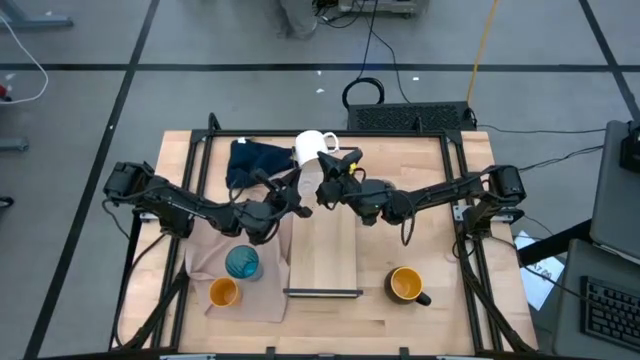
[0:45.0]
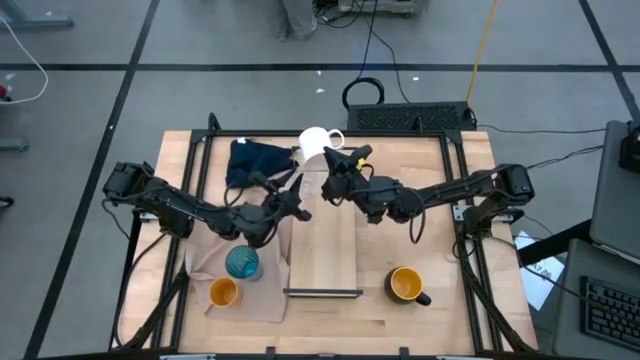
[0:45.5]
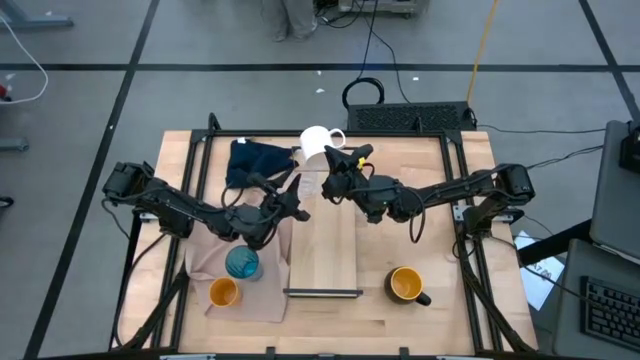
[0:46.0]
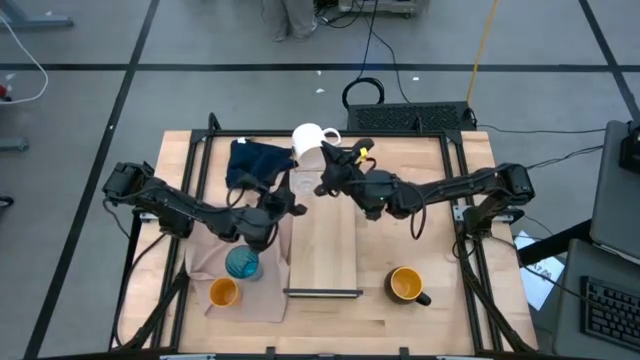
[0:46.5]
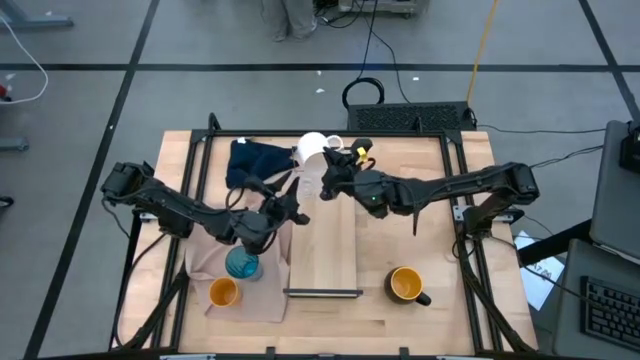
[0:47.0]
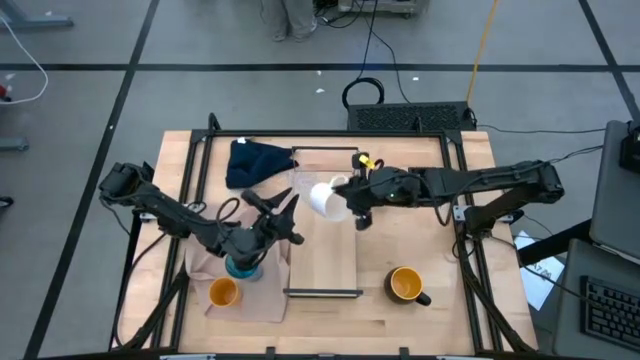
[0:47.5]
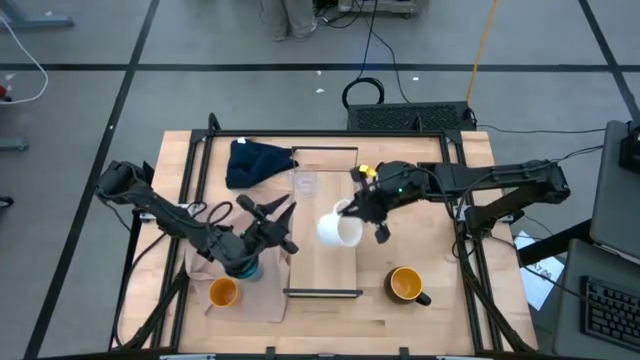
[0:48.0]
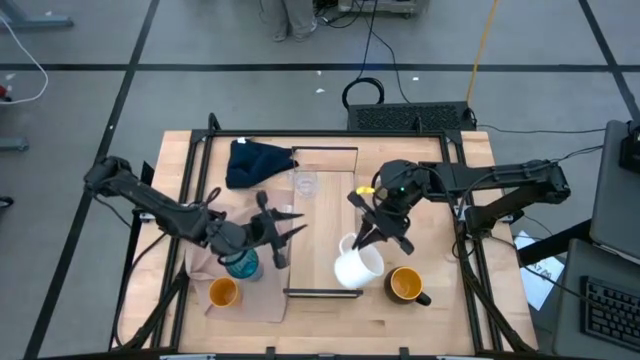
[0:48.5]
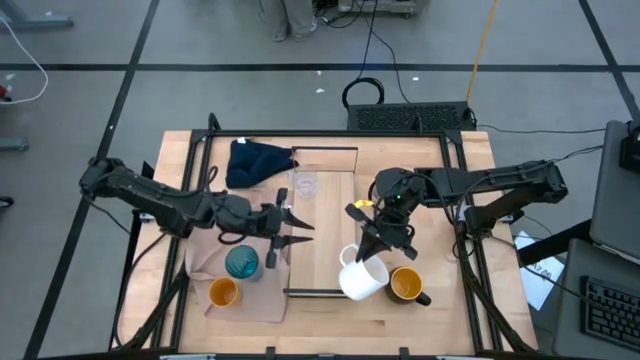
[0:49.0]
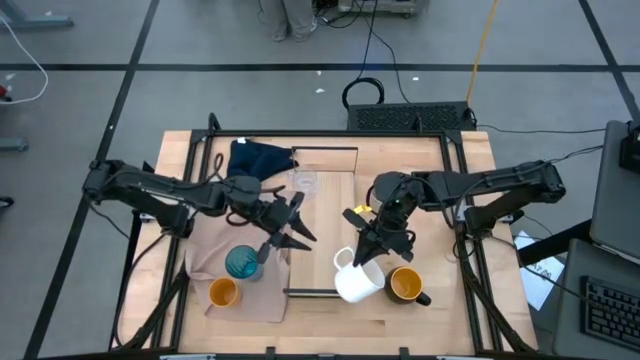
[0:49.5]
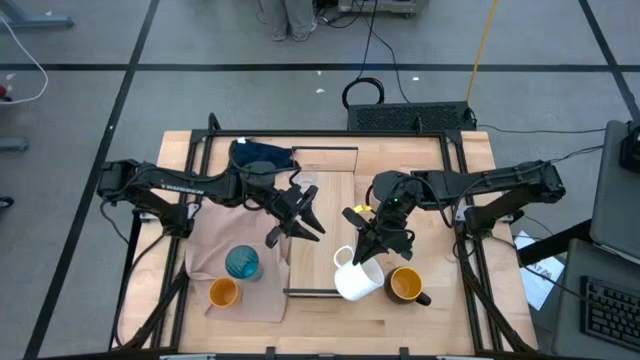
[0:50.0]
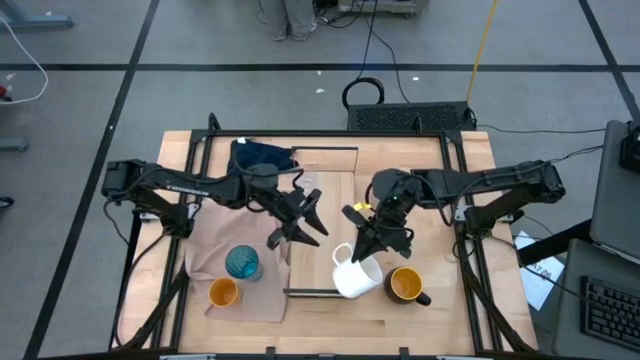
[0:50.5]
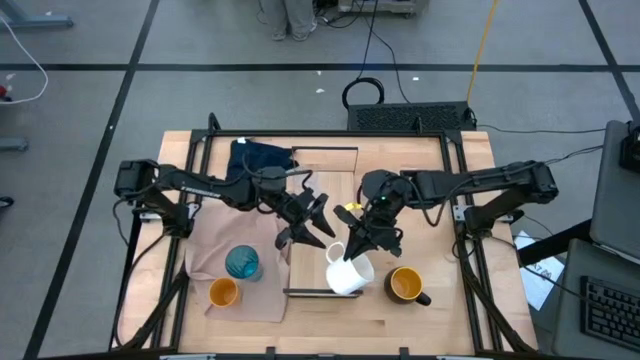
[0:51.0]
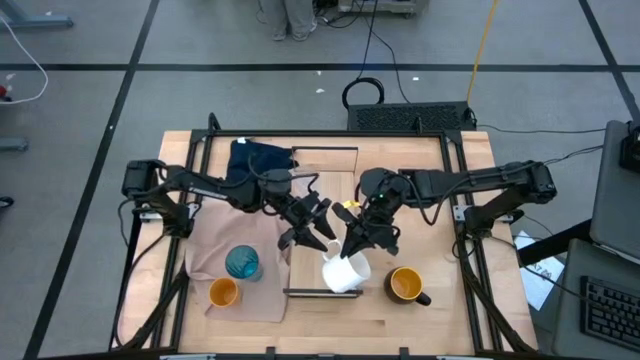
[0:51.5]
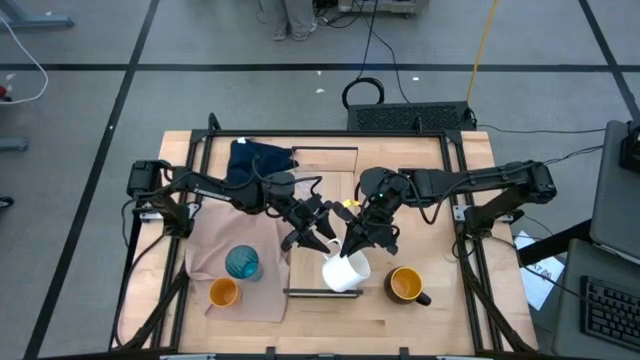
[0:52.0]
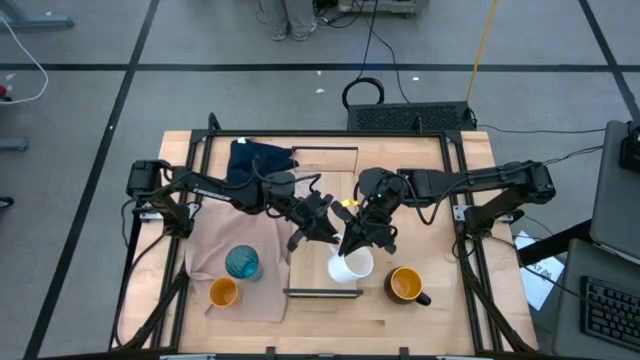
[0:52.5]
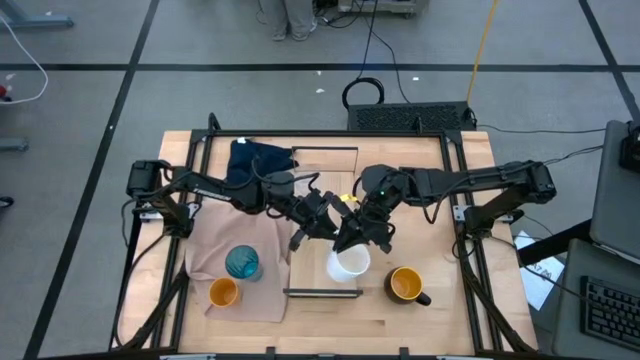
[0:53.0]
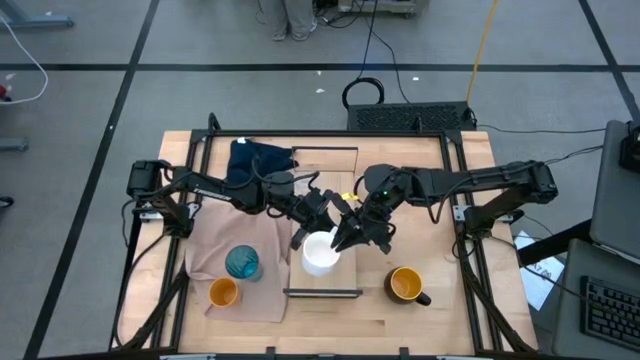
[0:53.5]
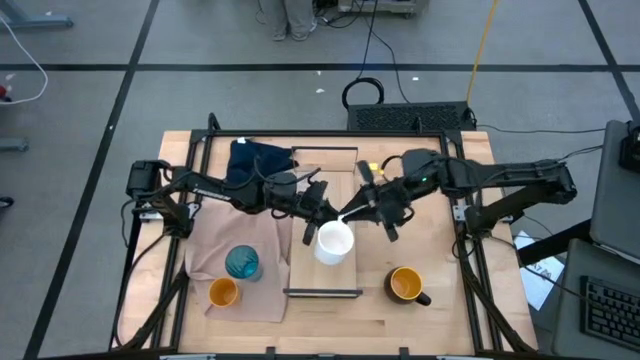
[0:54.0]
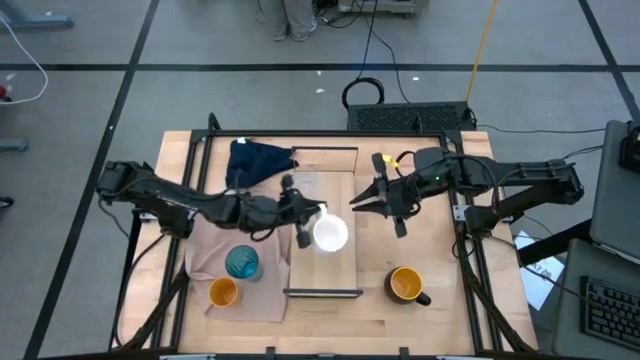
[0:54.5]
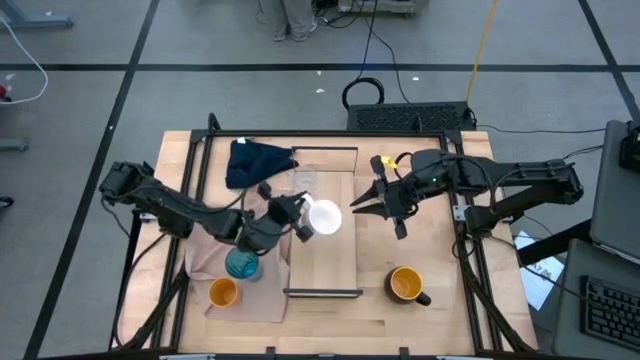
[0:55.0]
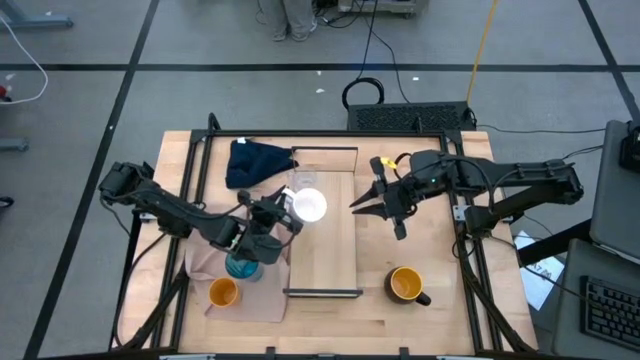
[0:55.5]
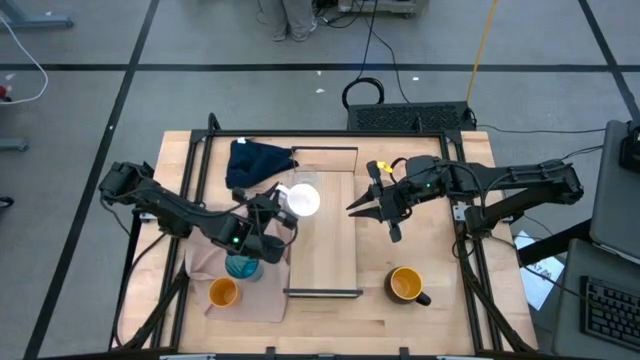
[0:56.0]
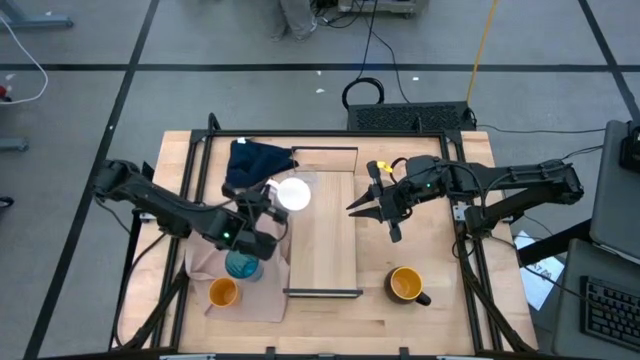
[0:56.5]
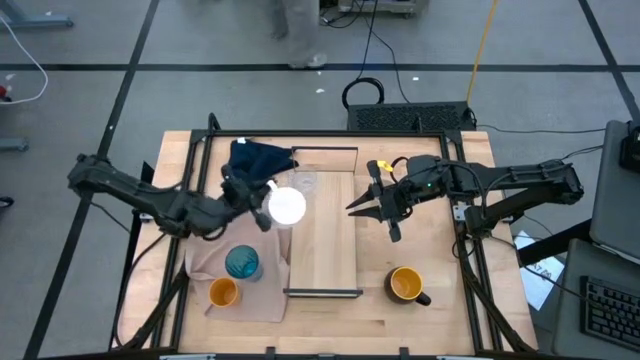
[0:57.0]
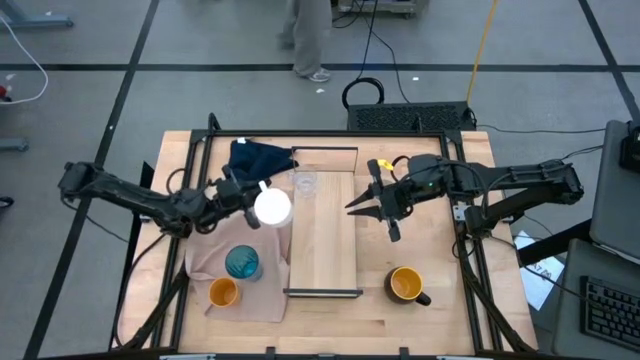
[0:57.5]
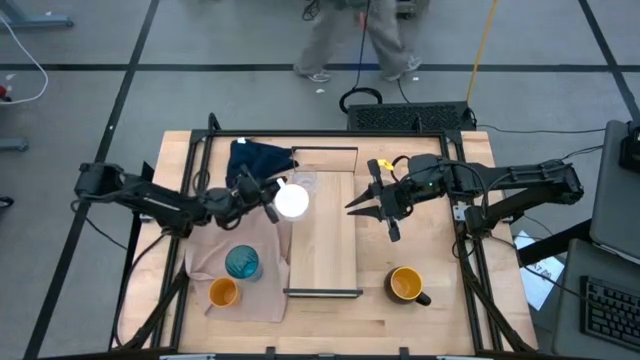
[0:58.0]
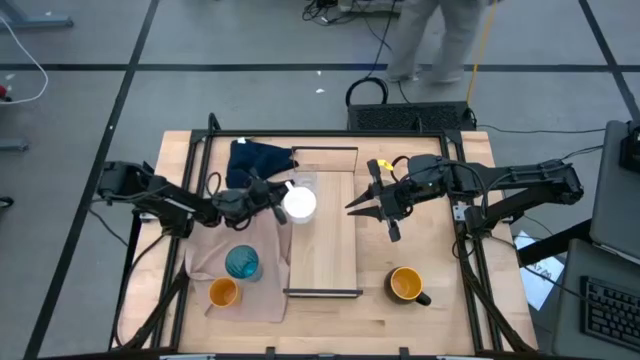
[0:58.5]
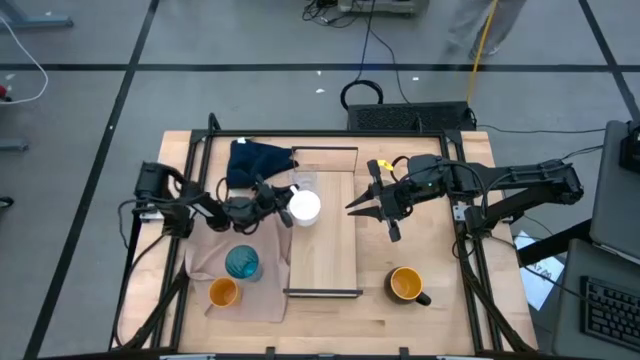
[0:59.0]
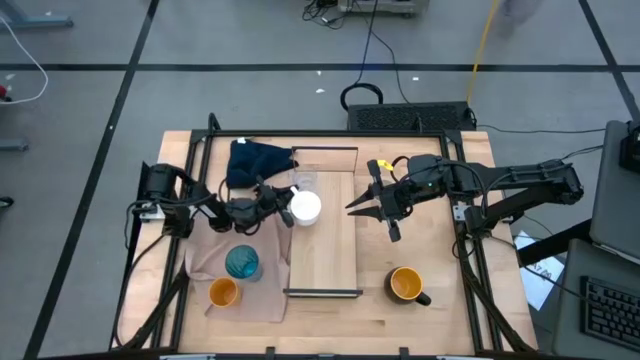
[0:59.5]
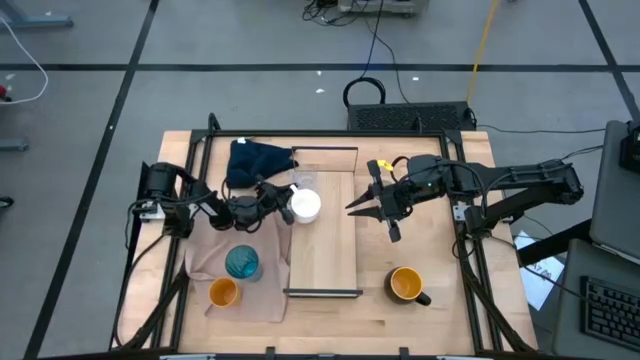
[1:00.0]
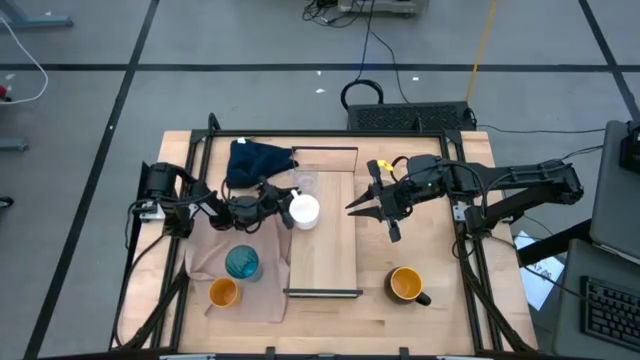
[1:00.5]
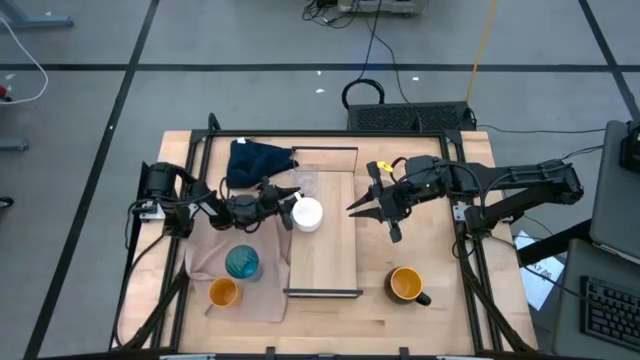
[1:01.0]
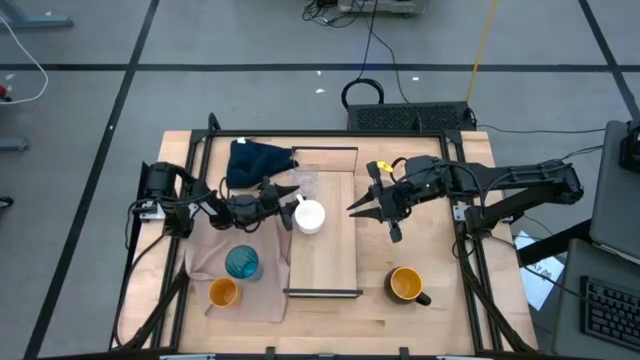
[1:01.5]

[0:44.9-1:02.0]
Task: Stack small to large cups/mugs on shelf
Put the white mug on the shelf

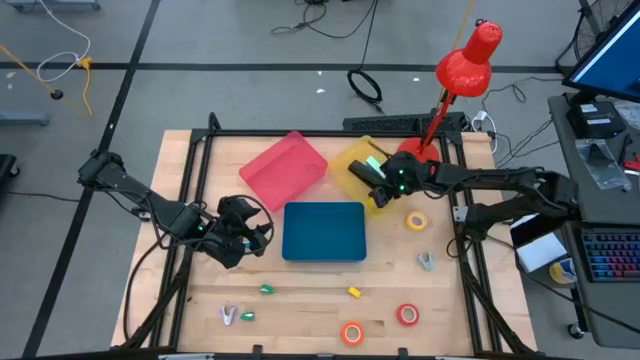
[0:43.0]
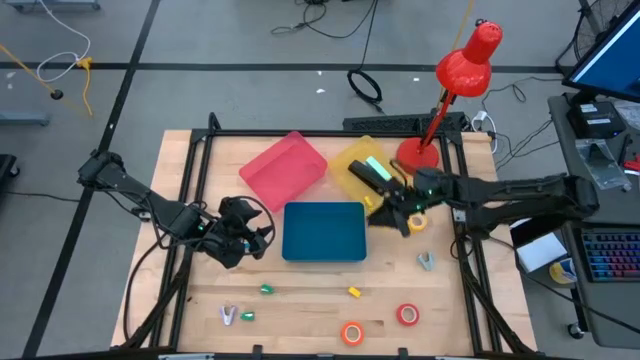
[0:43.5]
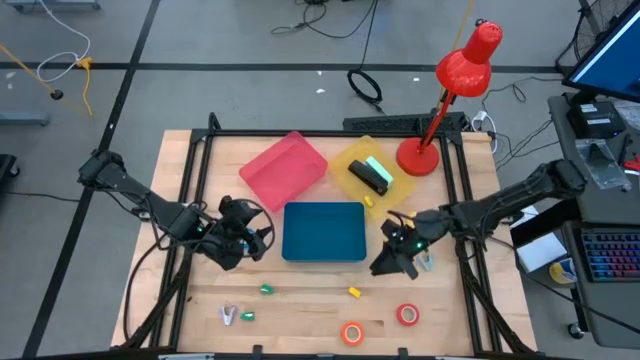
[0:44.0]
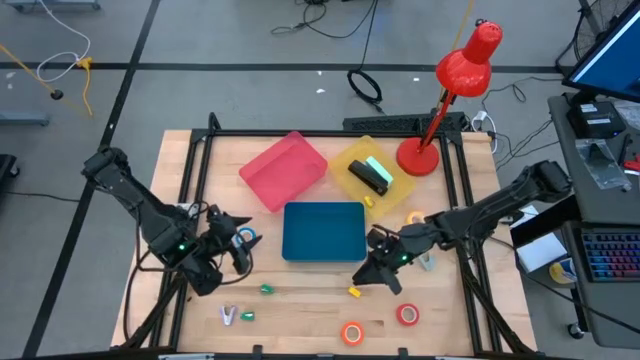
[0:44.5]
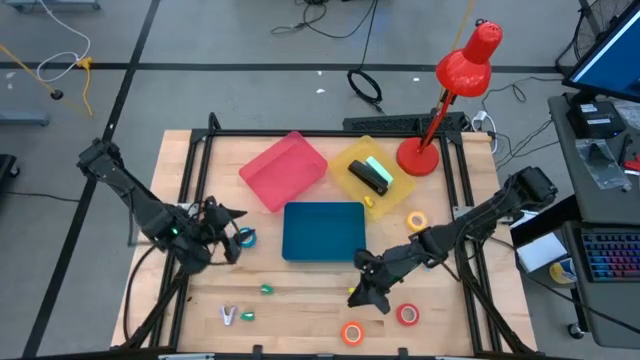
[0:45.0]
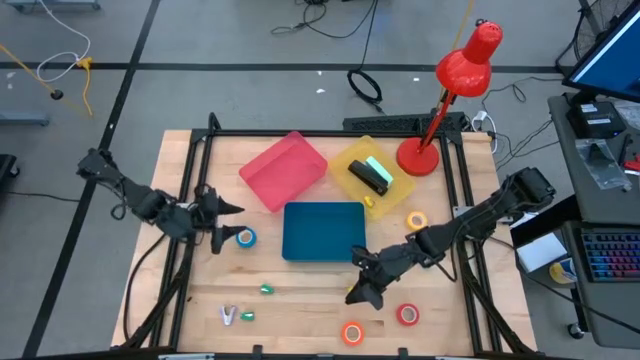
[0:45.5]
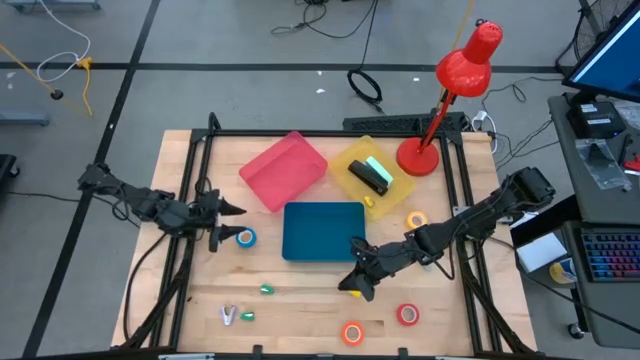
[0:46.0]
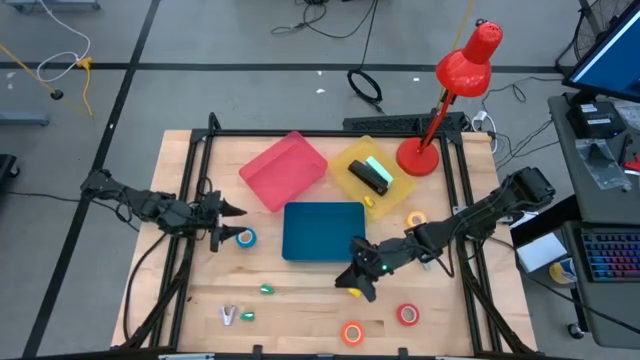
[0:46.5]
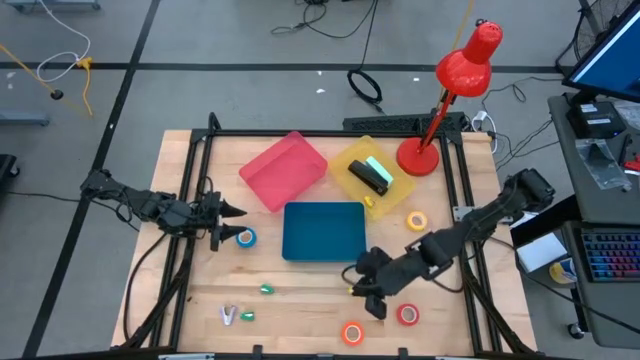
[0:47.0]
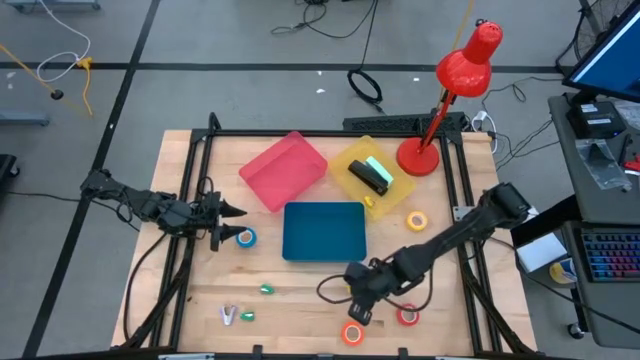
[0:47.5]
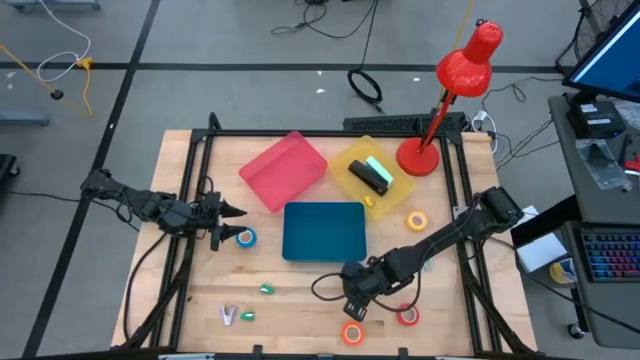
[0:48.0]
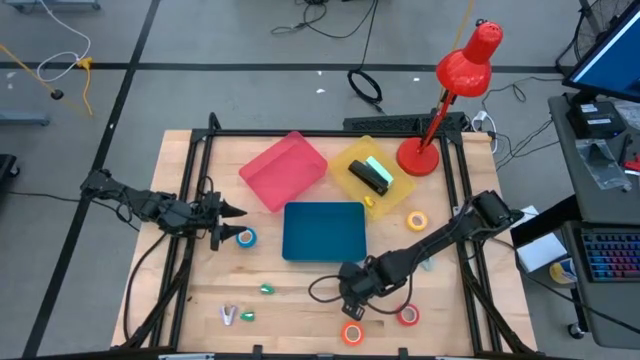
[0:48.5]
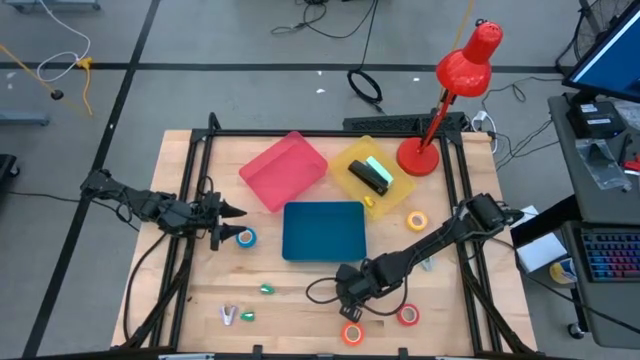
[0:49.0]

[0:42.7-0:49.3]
Task: Pick and place Stapler, Stapler remover, tape
Put the yellow stapler into the yellow bin
